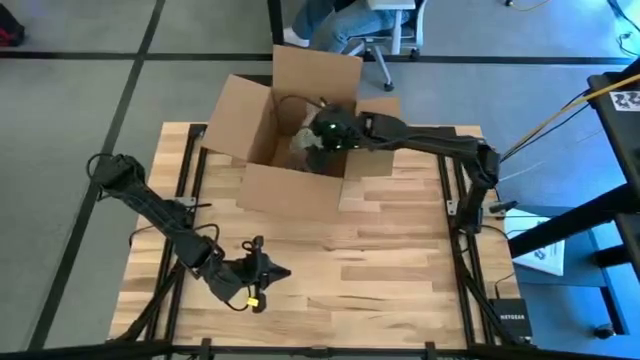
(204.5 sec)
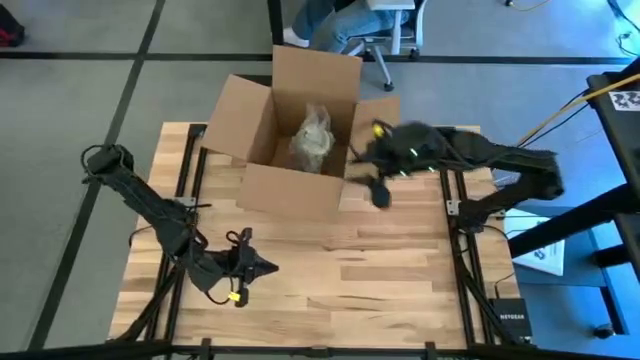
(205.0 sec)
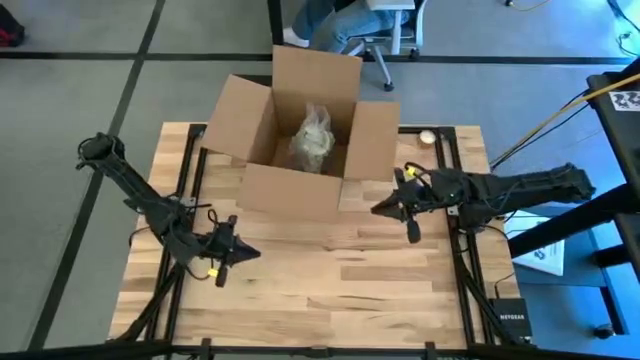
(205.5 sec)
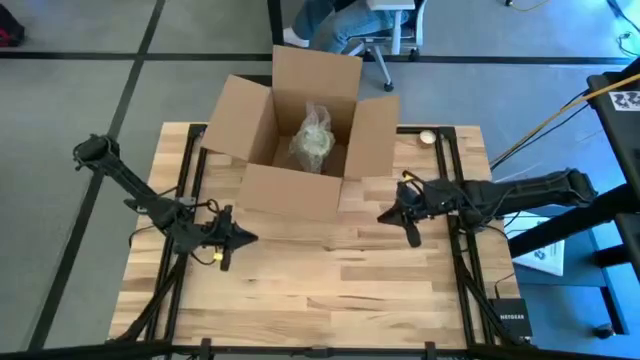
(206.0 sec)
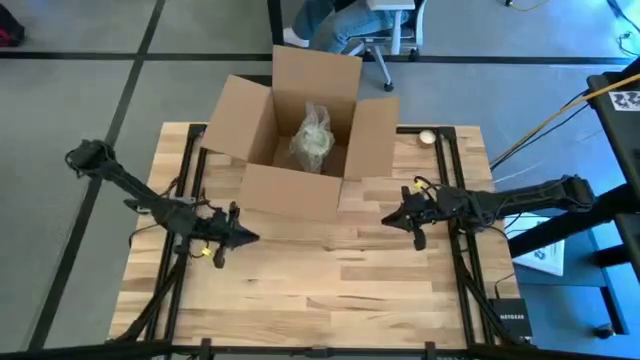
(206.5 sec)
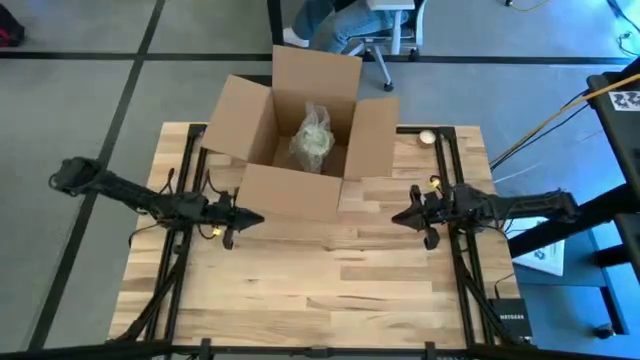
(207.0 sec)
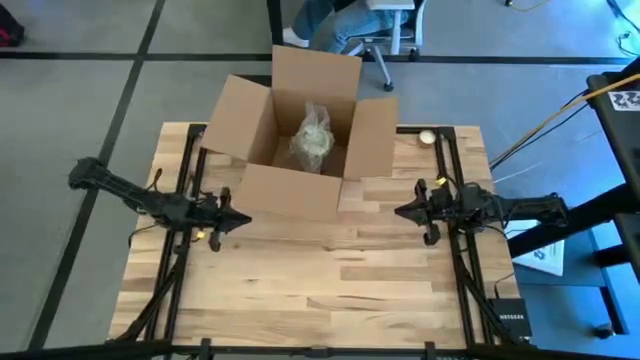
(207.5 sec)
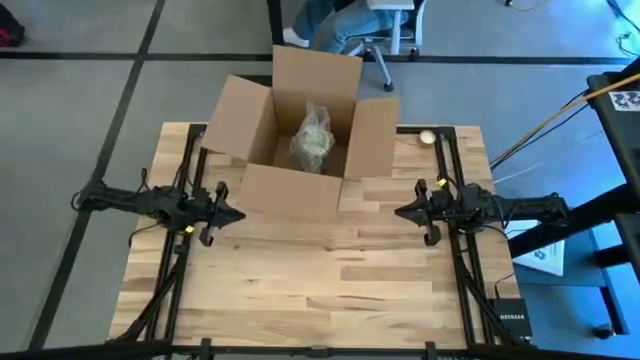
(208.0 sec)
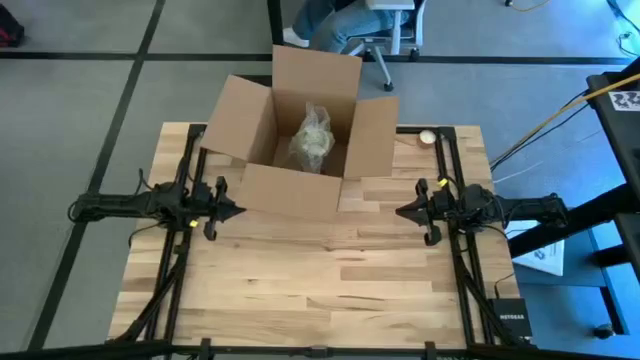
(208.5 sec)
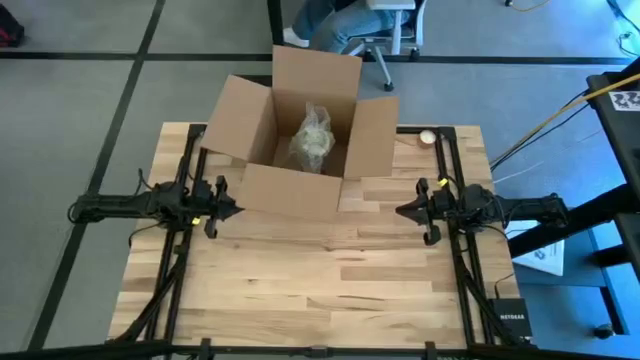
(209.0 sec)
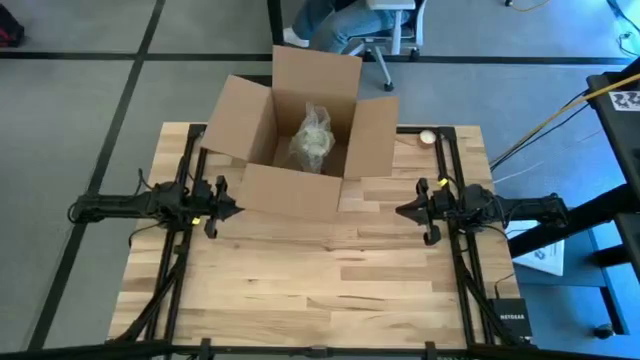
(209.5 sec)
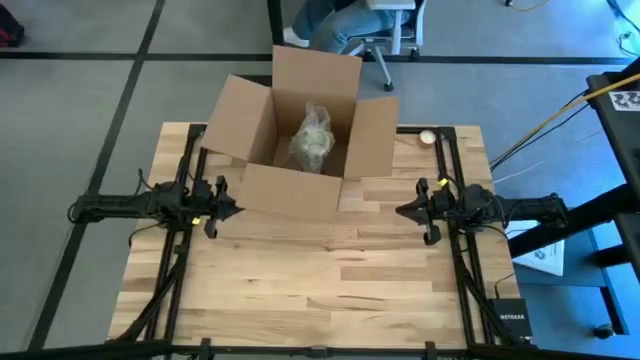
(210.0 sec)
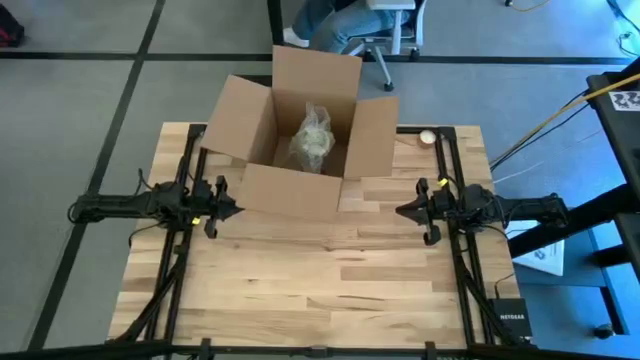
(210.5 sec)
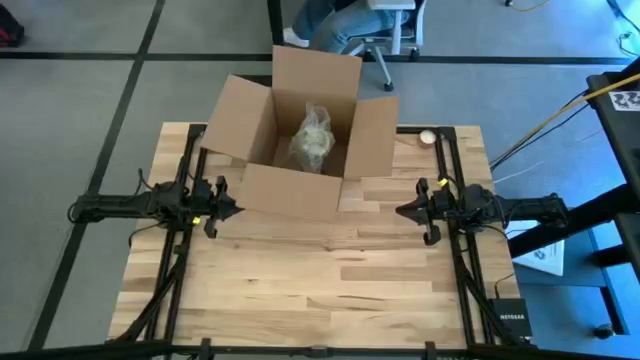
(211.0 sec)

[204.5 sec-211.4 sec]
Task: wrap mug
Return to Home Position

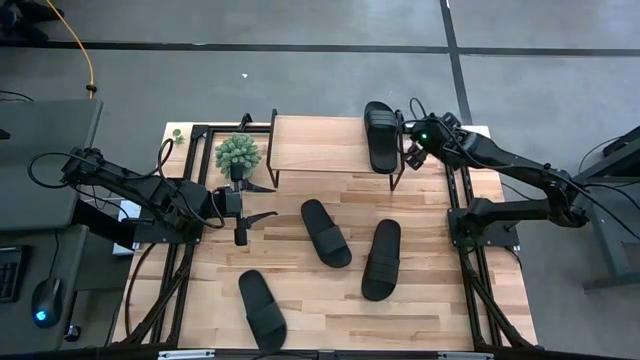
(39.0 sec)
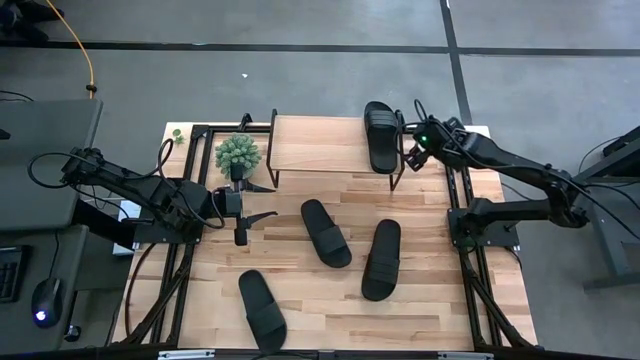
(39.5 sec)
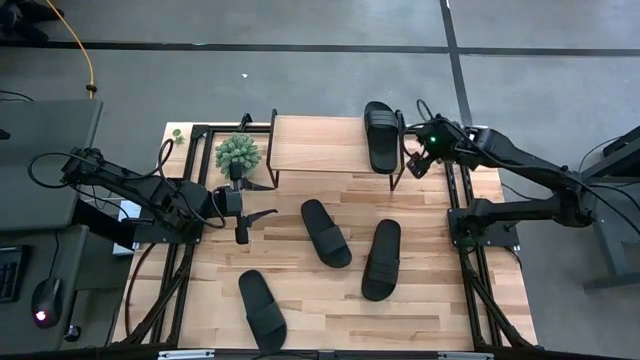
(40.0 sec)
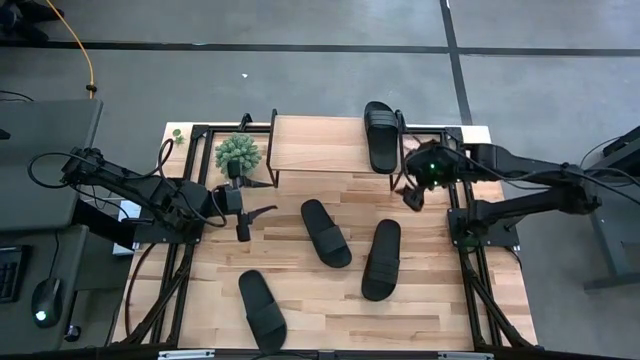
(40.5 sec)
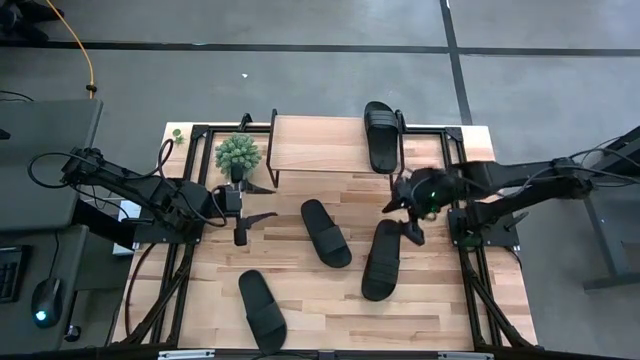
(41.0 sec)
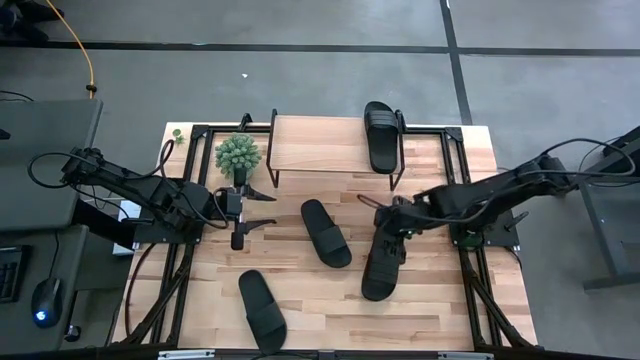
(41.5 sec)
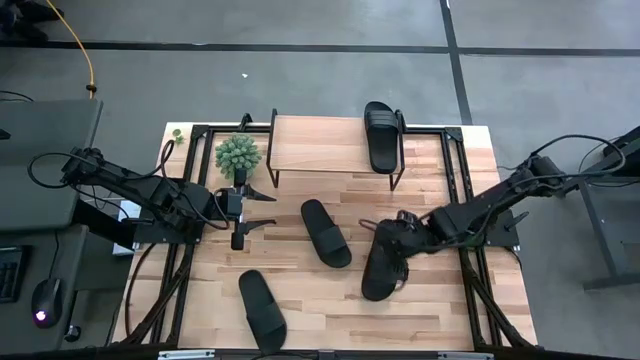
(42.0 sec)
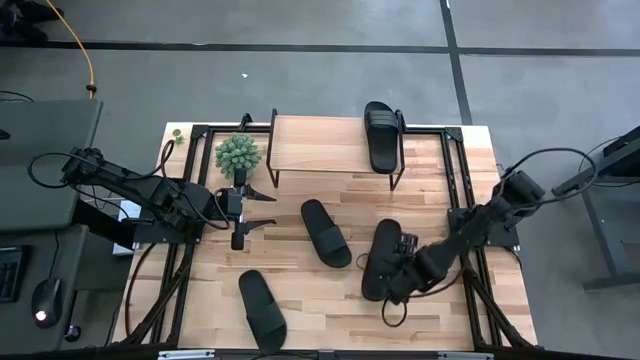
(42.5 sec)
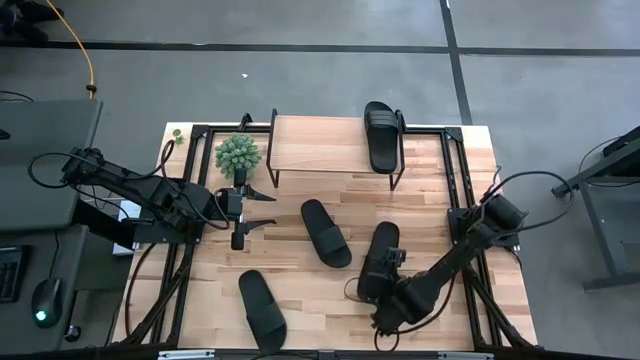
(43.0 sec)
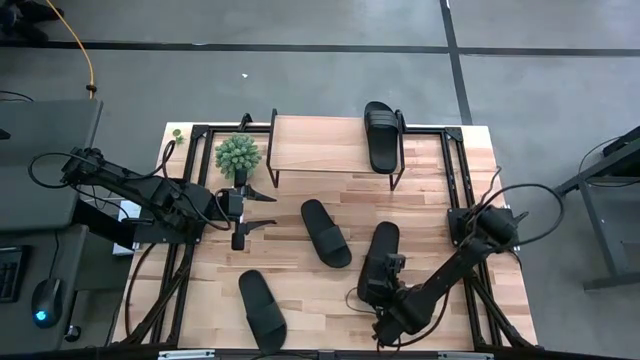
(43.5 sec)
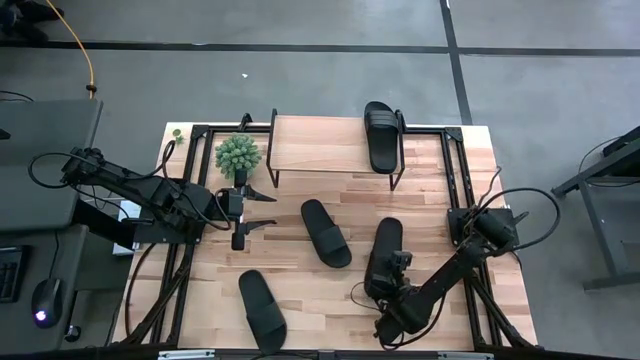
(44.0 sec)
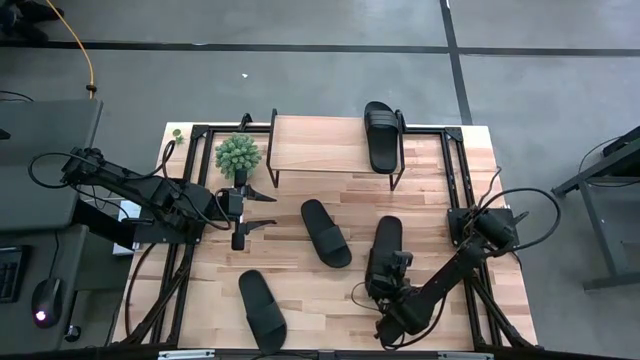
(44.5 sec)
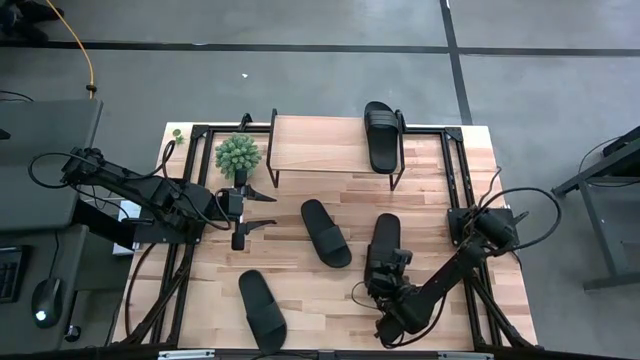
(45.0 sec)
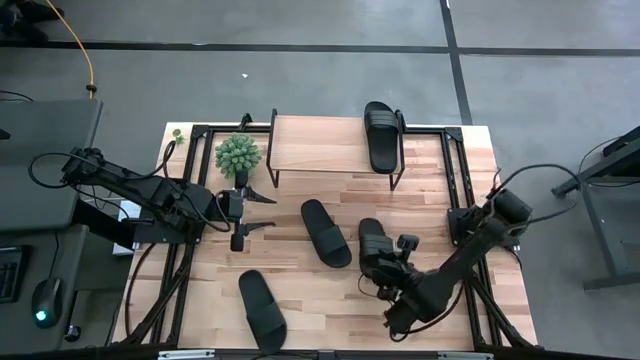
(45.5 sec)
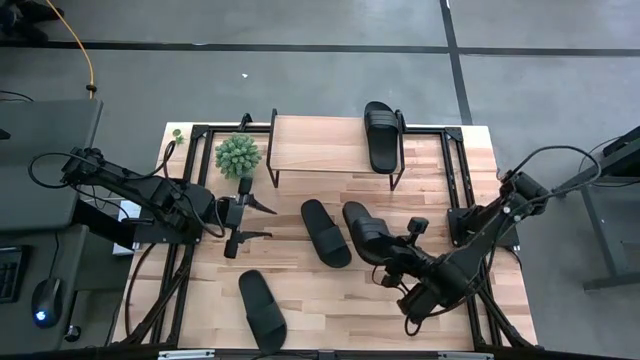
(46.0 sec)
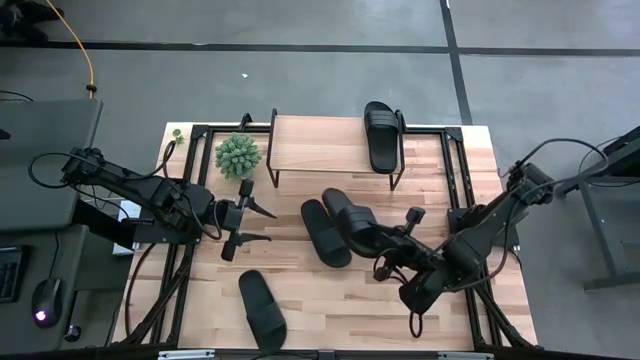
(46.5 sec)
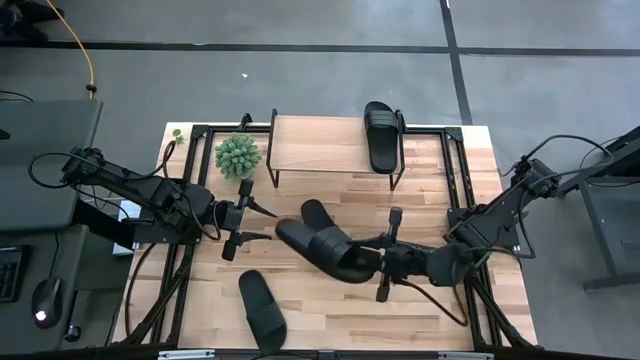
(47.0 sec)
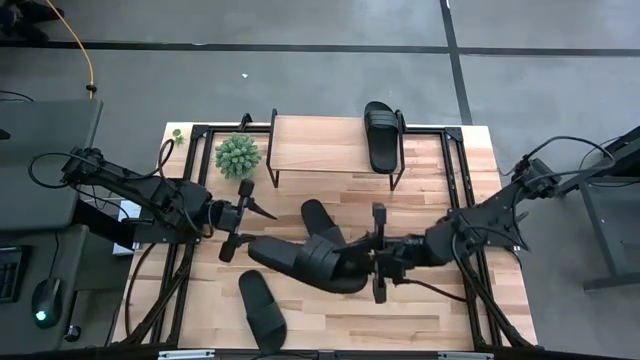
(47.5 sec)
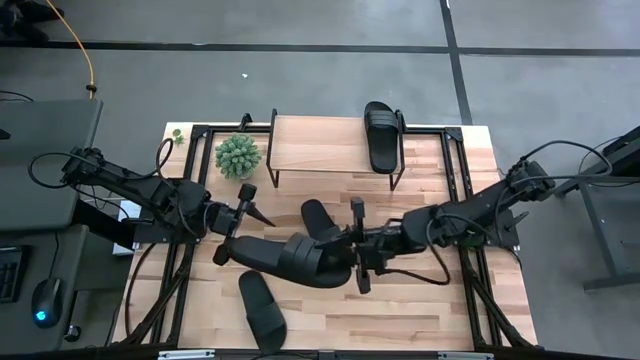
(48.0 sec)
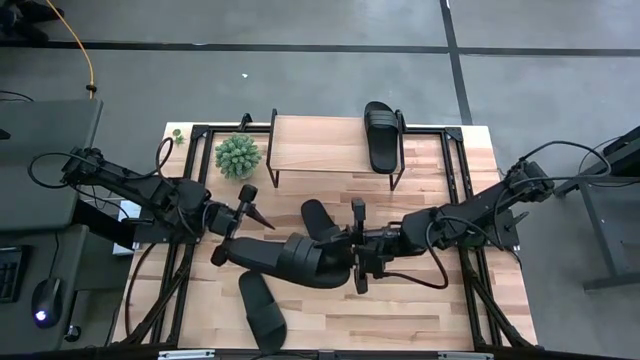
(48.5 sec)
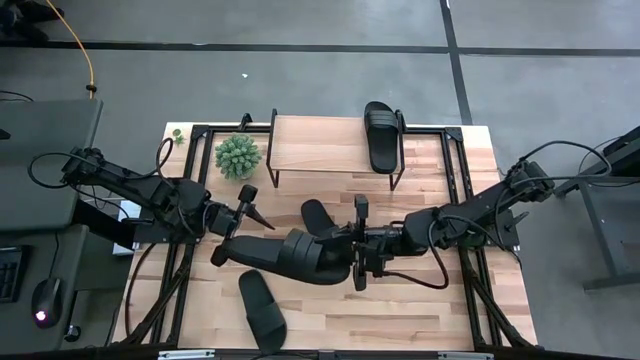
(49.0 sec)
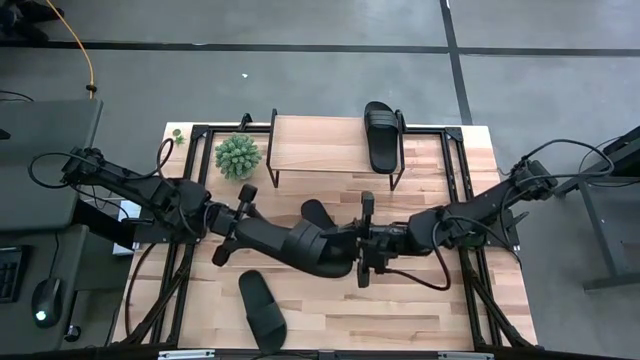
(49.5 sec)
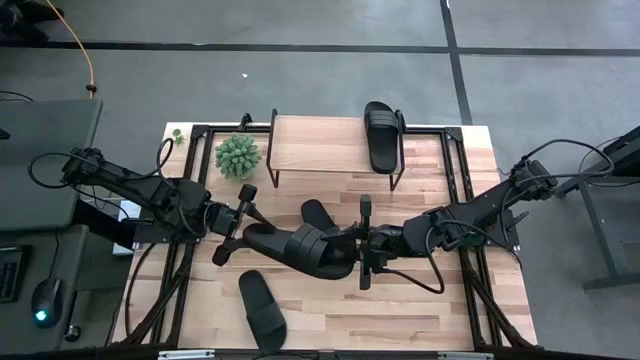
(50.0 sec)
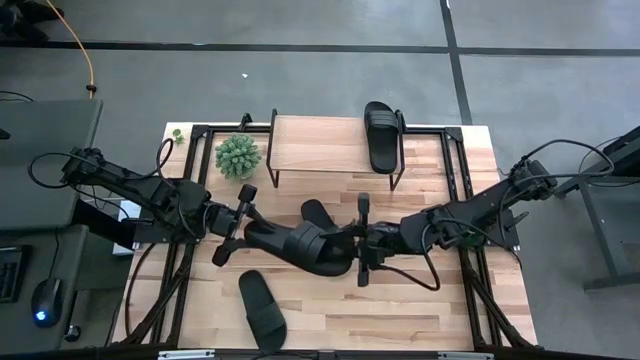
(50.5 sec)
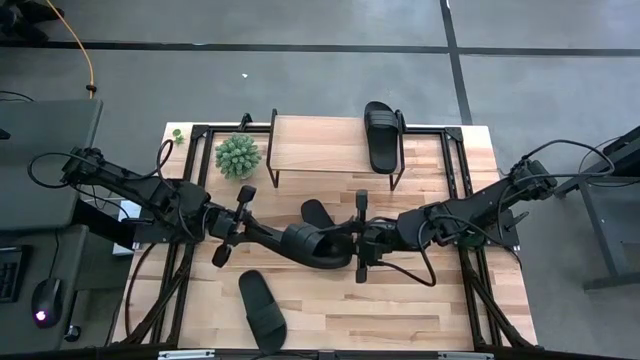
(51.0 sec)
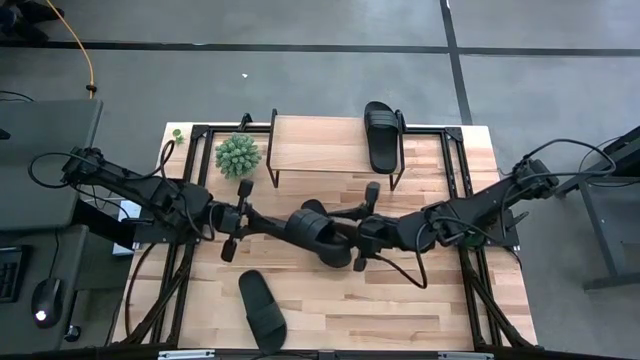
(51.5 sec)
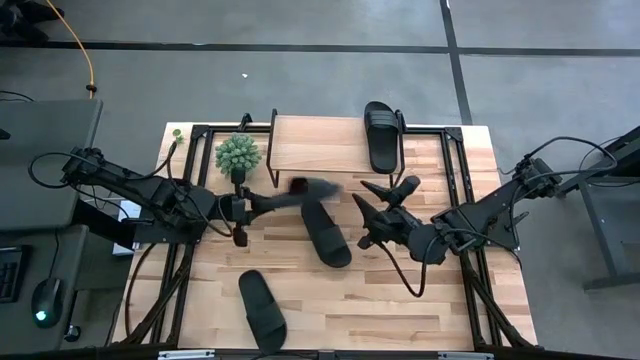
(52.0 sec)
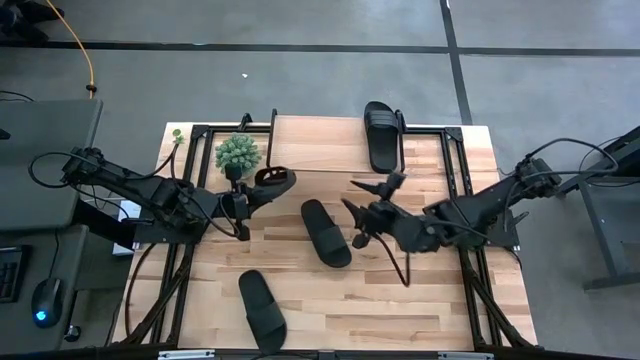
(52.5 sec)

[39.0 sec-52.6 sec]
Task: Pick and place slides into the shelf
Put the black slide on the shelf
